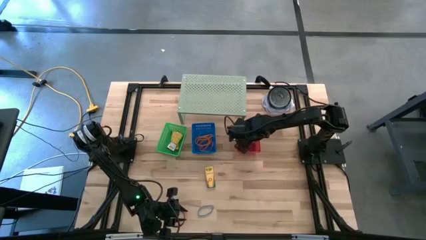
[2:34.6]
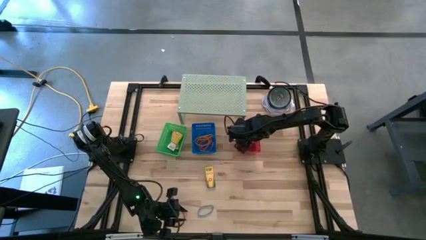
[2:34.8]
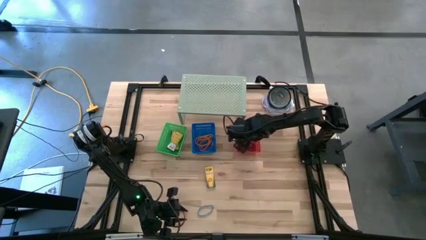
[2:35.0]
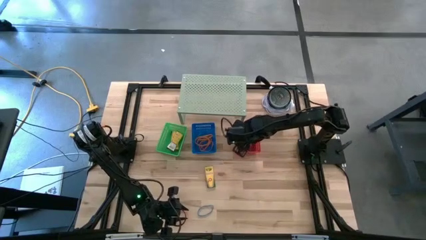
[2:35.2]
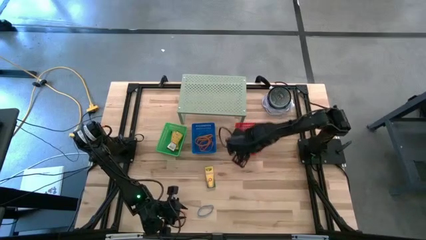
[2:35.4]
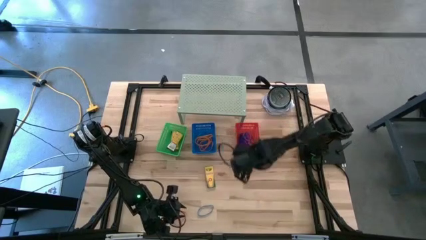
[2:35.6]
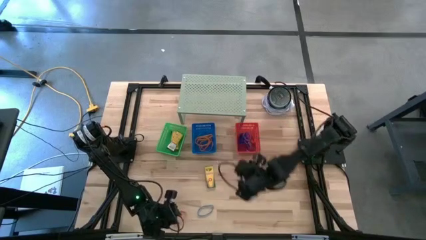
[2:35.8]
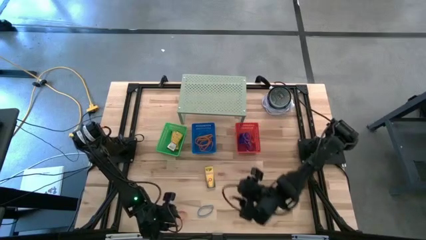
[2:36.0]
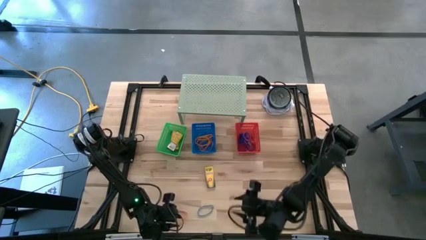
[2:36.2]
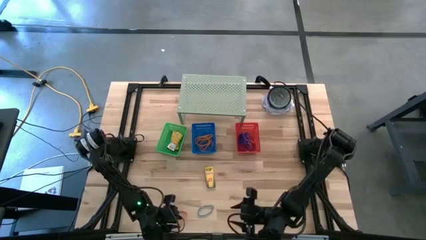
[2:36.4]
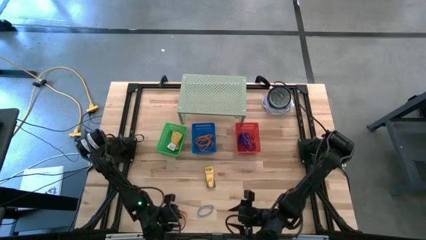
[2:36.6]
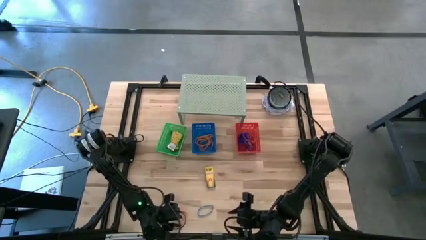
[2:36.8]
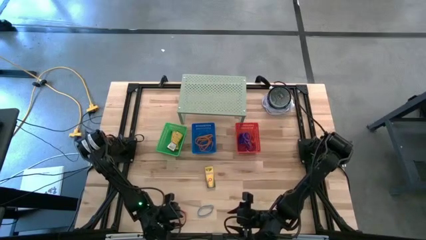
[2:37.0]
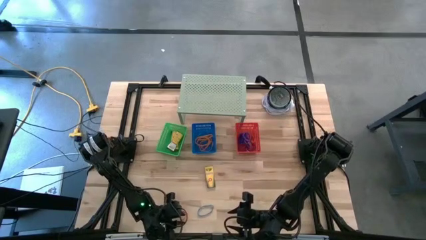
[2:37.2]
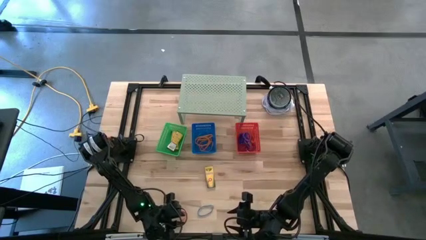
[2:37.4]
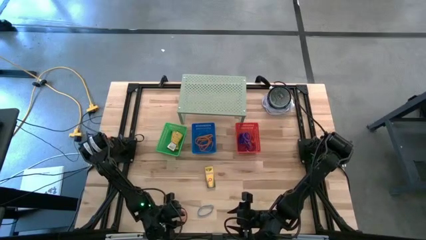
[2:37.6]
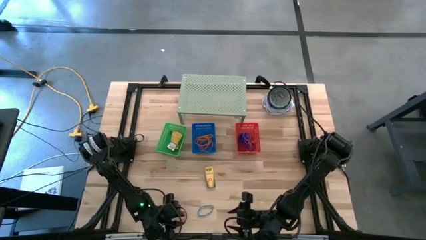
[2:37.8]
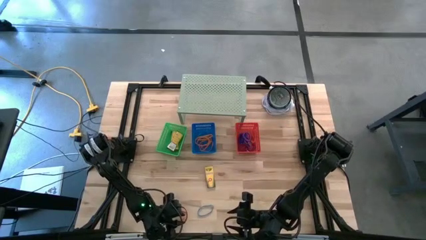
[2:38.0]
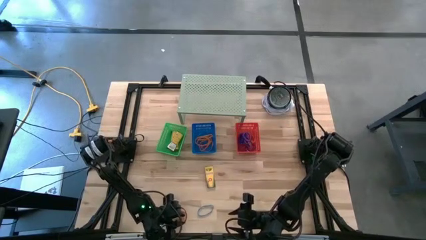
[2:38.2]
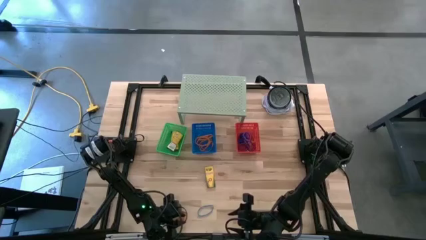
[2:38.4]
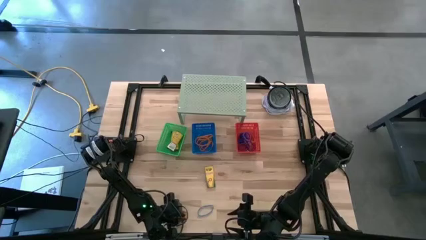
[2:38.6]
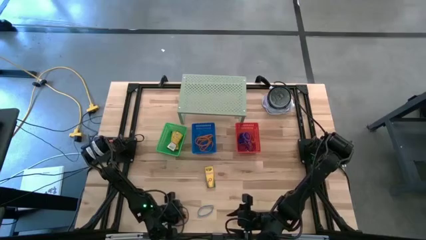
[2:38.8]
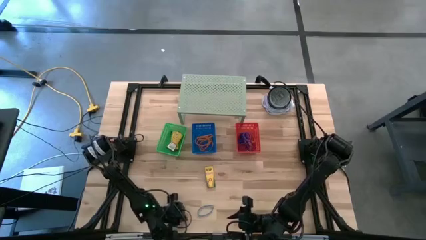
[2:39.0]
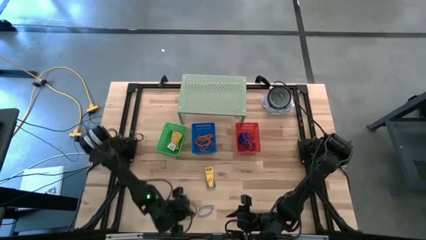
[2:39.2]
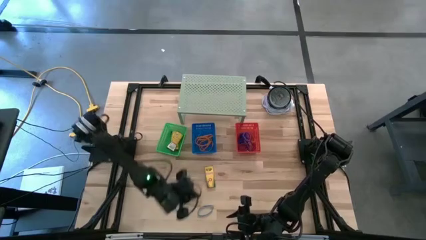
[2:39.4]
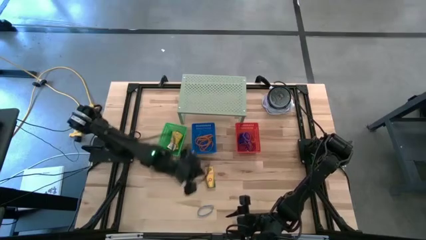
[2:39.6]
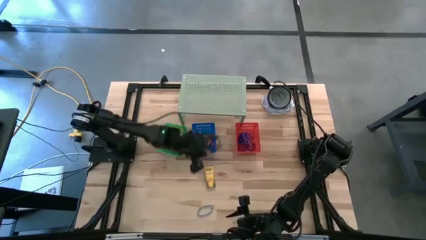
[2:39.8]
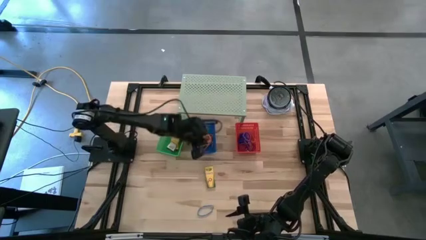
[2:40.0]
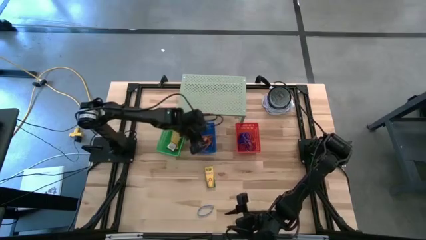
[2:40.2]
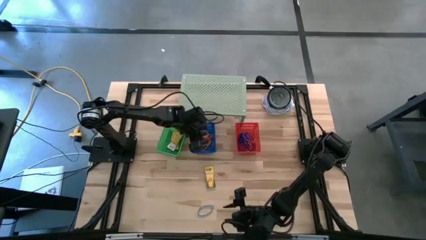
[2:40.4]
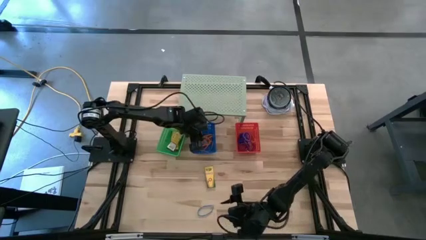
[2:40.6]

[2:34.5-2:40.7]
Task: Pick & Place Office Desk Supplies
Put the orange rubber band into the blue bin

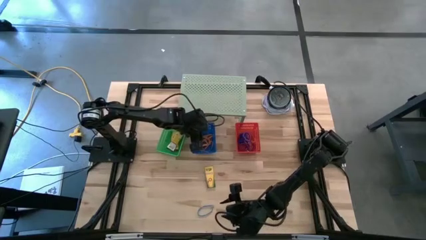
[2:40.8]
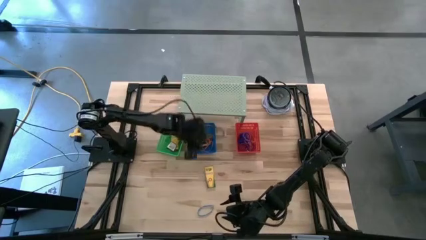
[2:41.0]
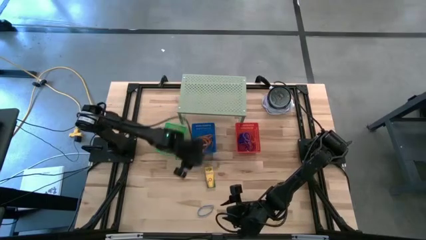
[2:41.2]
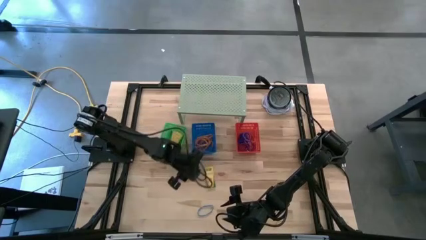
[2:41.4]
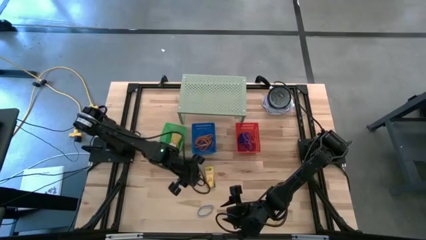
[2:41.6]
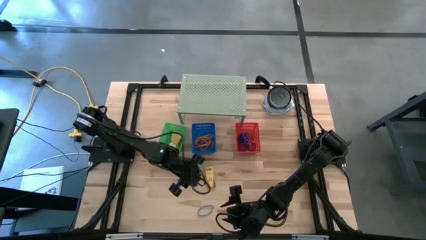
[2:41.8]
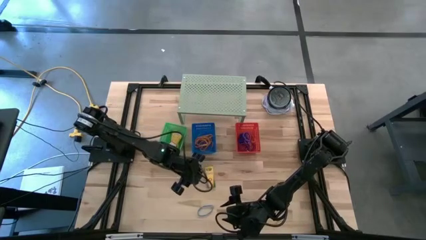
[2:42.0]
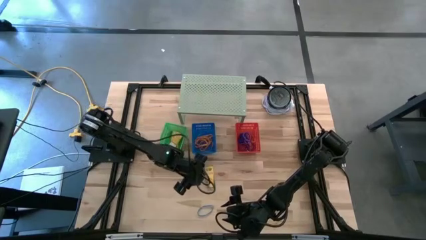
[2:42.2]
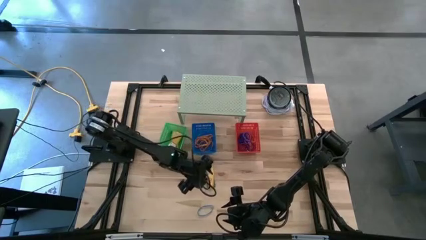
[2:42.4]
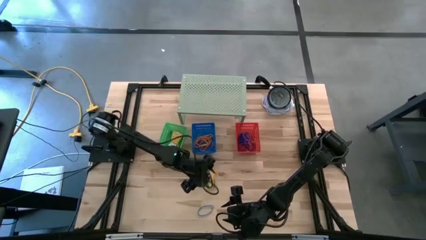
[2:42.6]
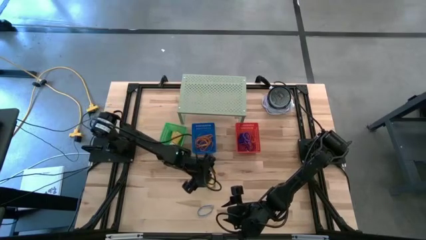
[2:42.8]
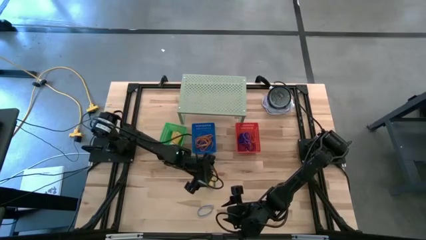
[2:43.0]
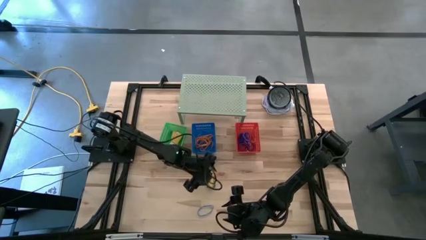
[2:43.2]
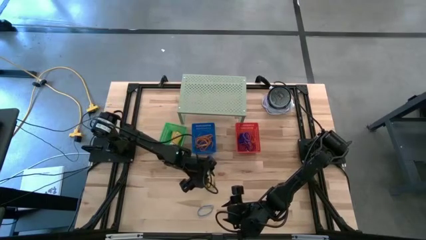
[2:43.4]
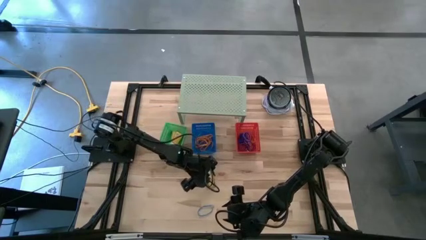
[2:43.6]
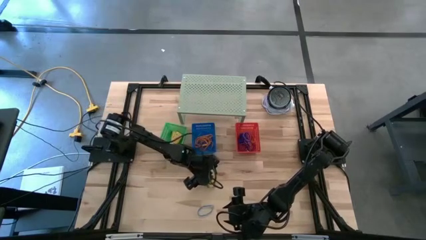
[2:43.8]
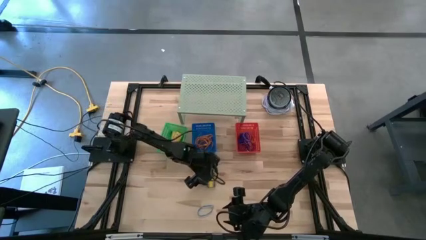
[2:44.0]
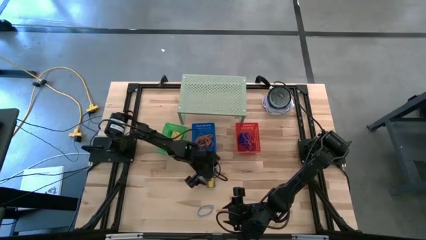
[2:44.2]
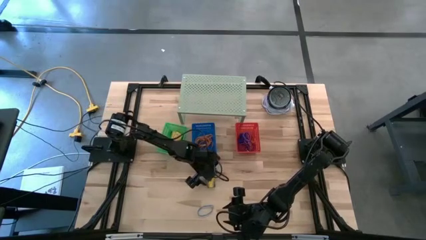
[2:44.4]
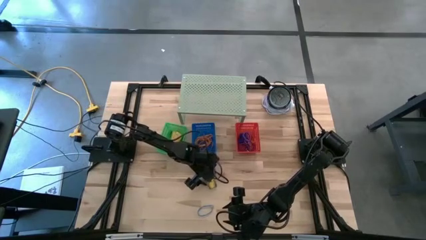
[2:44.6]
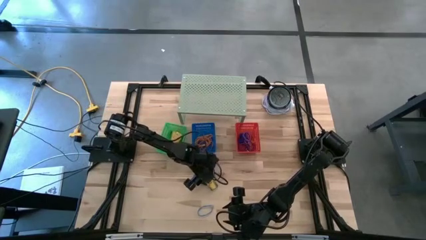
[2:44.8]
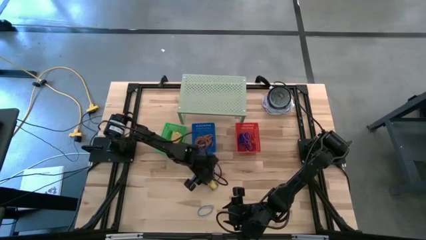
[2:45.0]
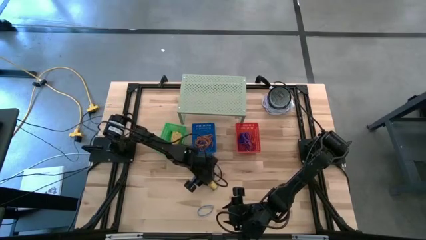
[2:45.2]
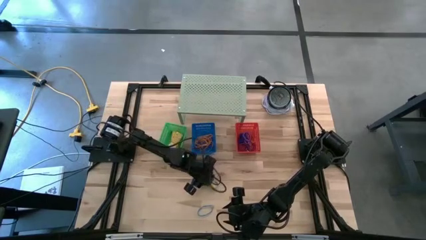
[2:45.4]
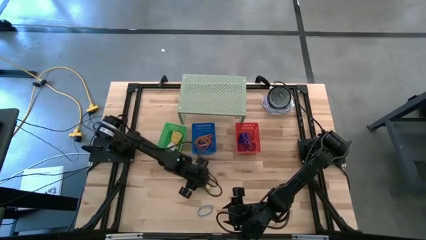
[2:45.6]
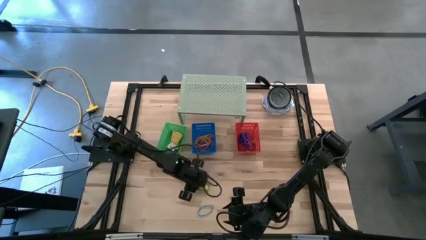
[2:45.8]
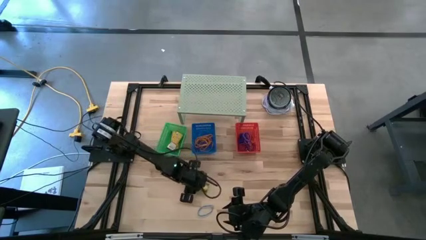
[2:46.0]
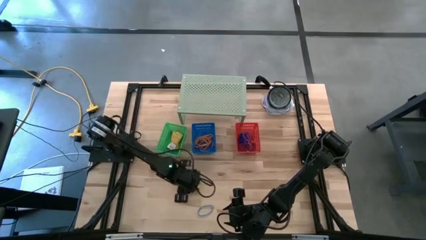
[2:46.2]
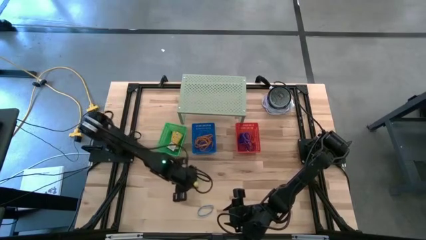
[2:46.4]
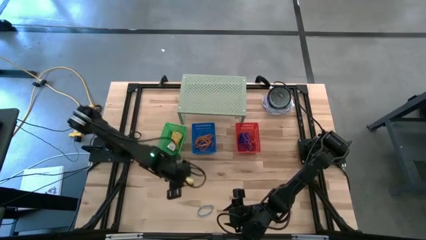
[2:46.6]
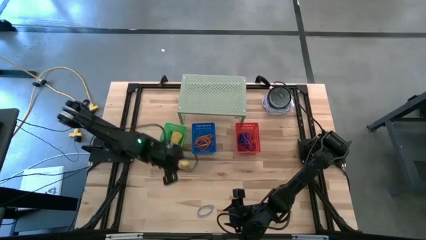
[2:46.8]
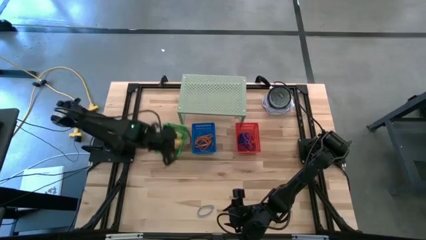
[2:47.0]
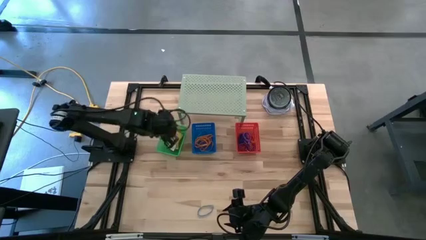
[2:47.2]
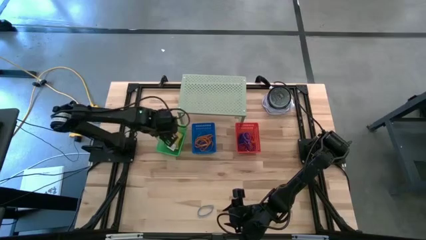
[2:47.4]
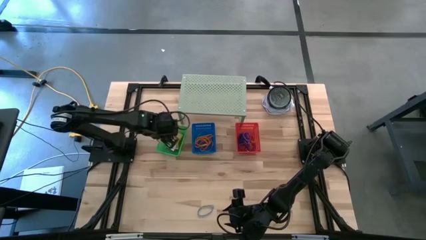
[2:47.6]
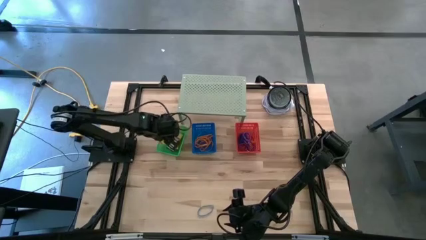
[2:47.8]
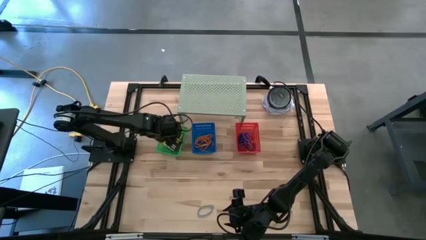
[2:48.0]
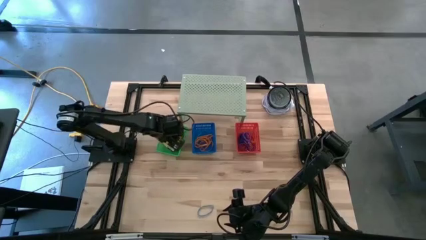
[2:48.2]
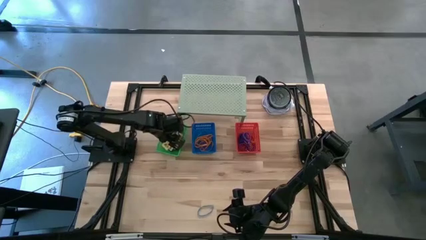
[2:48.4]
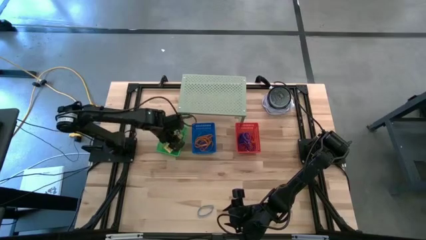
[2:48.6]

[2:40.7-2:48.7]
Put the crayon box into the green bin

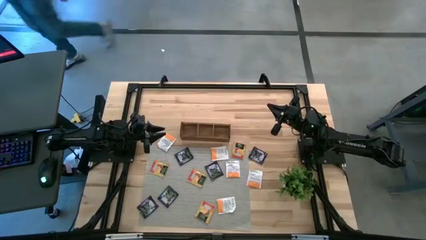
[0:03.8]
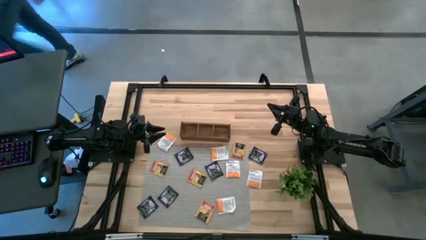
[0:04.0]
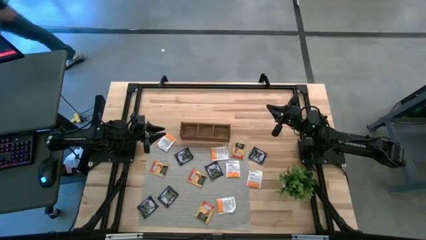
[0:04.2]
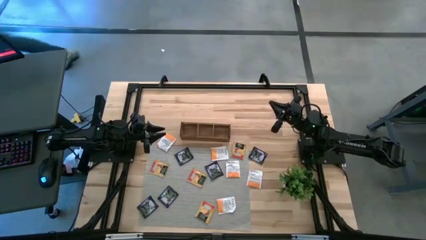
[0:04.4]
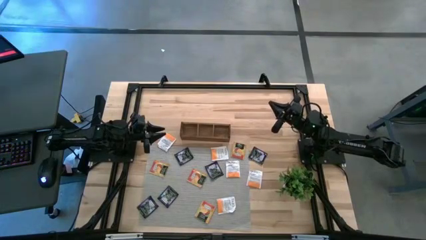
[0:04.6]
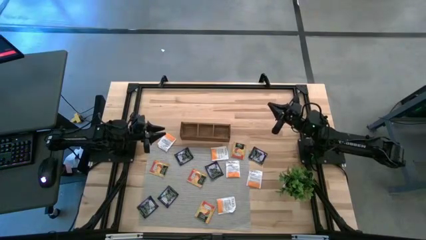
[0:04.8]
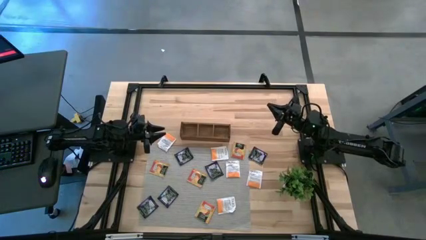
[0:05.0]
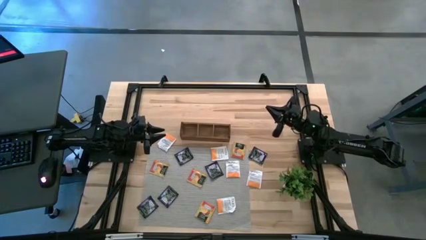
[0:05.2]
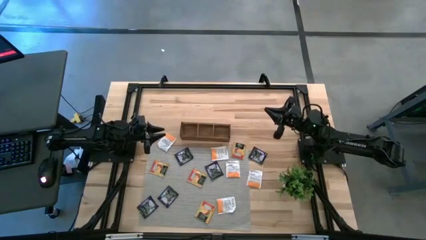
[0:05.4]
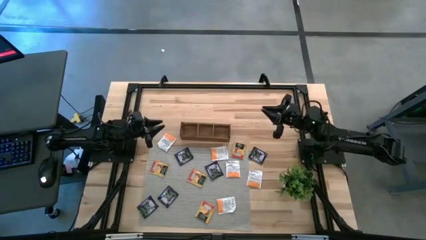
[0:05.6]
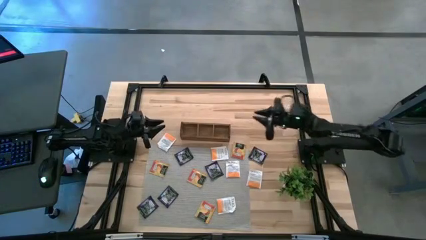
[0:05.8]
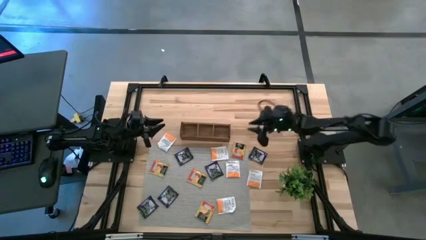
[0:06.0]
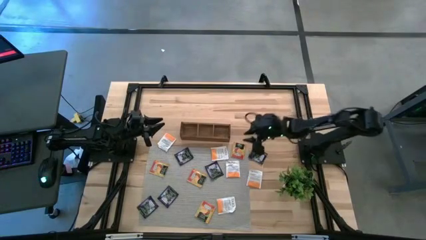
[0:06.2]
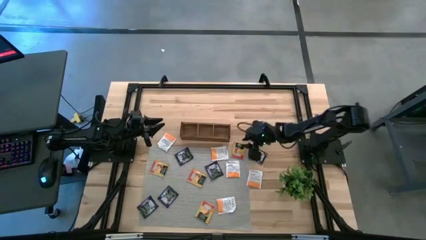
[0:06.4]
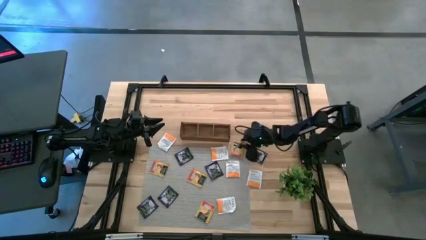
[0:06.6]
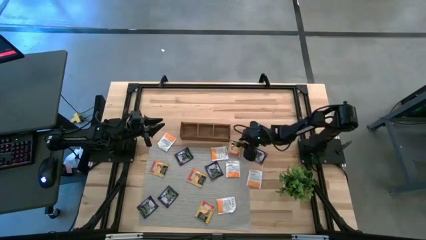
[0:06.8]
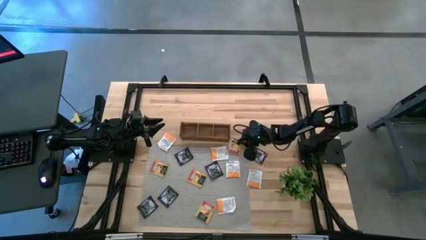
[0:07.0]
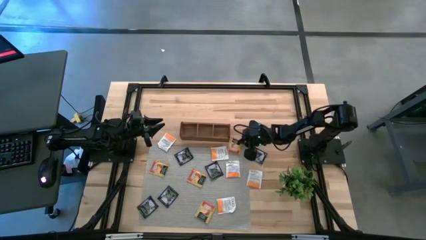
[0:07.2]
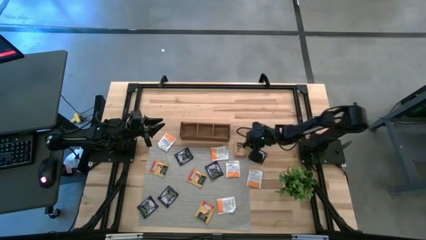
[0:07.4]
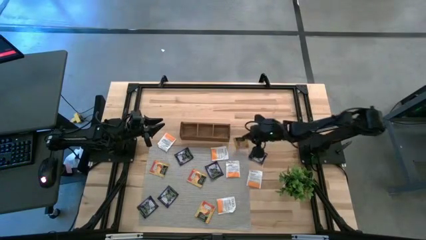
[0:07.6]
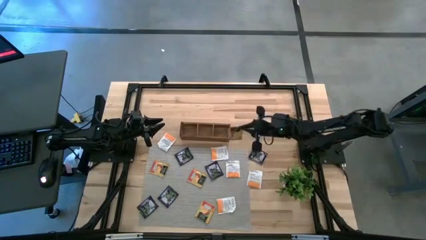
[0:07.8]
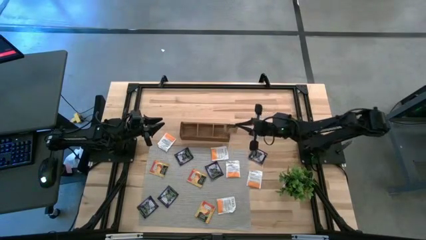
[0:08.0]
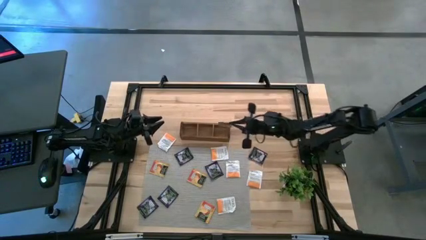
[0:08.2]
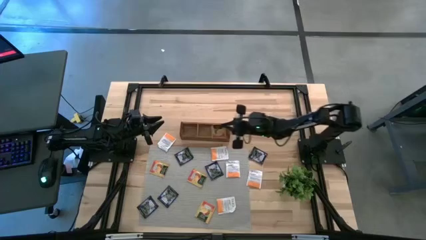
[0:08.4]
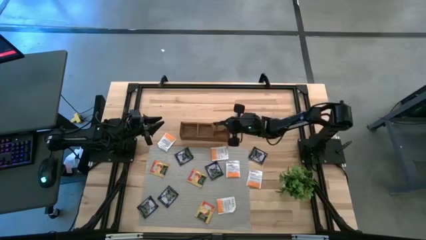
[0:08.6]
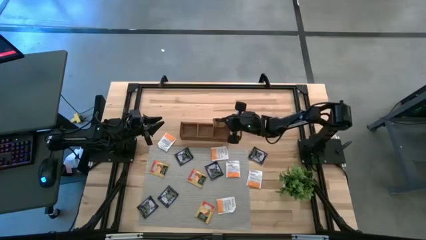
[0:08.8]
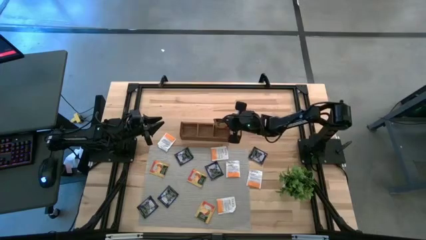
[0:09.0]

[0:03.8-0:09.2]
Task: Pick & Place Tea
Put the yellow tea bag into the right section of the wooden organizer
